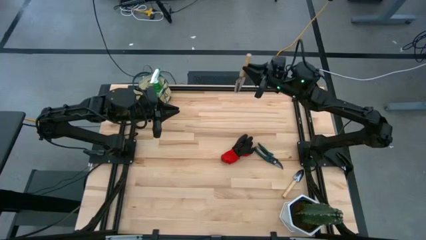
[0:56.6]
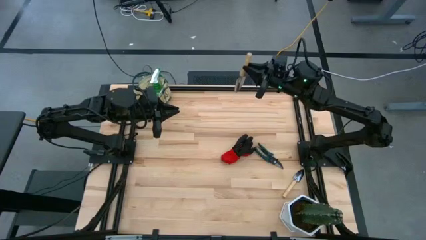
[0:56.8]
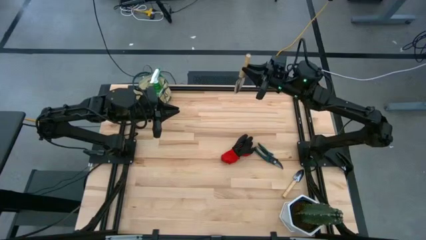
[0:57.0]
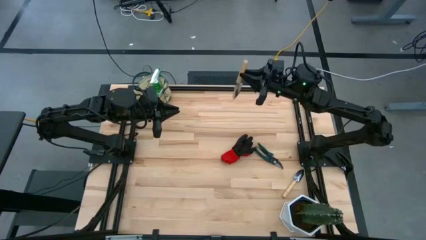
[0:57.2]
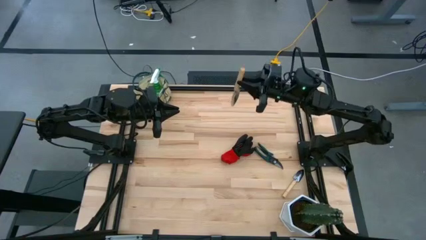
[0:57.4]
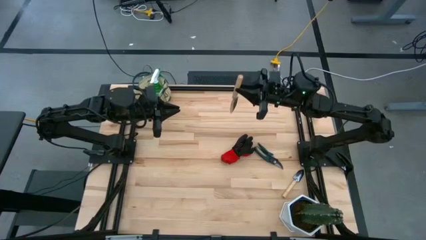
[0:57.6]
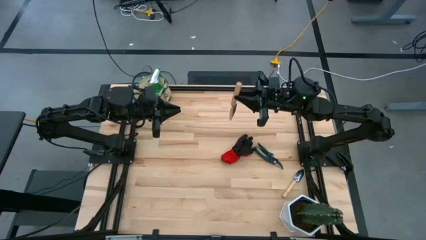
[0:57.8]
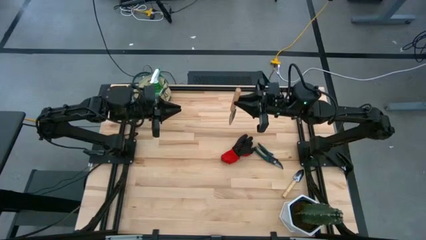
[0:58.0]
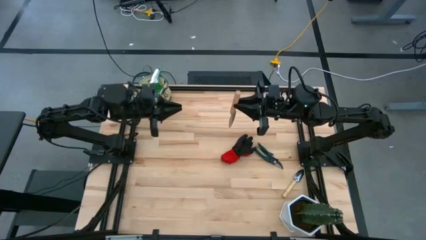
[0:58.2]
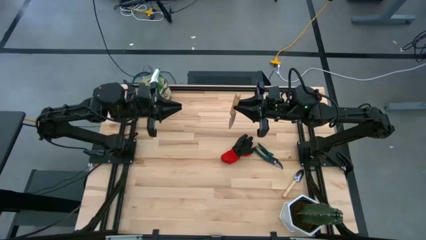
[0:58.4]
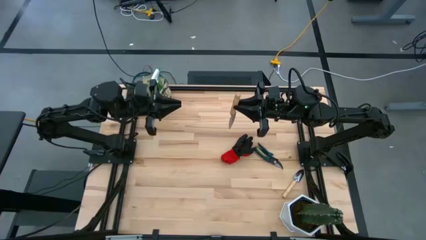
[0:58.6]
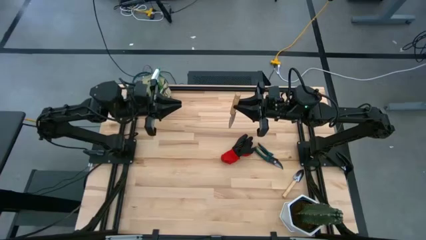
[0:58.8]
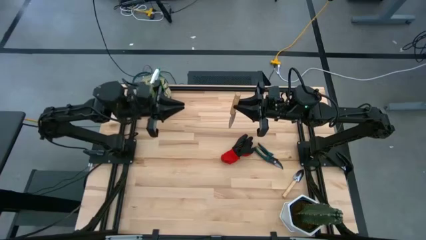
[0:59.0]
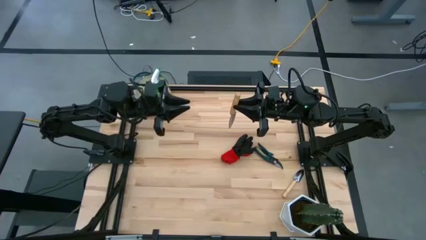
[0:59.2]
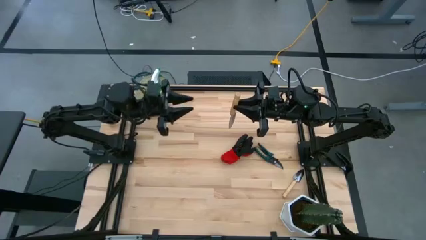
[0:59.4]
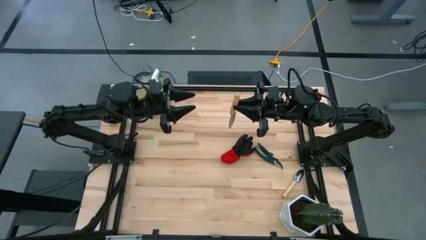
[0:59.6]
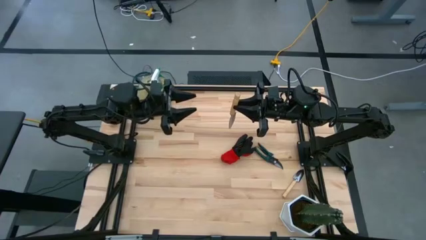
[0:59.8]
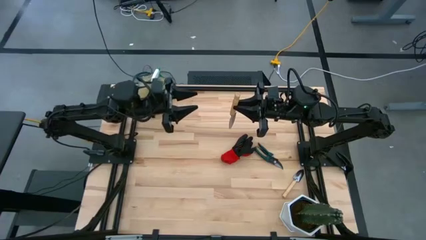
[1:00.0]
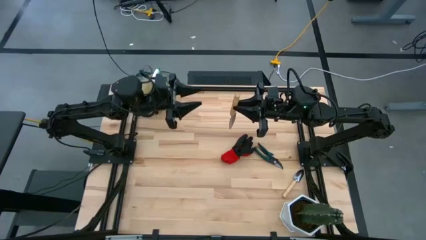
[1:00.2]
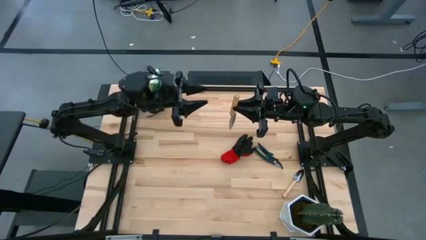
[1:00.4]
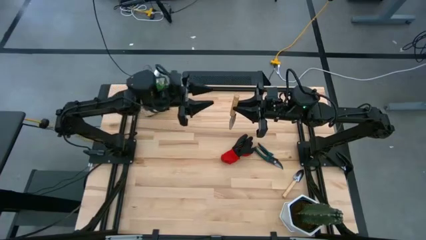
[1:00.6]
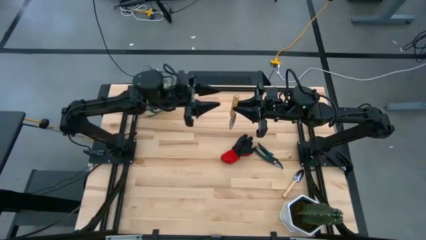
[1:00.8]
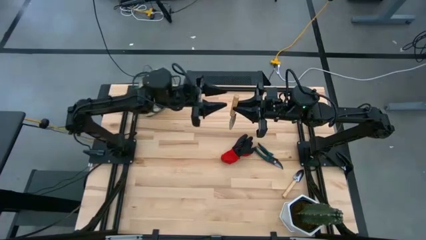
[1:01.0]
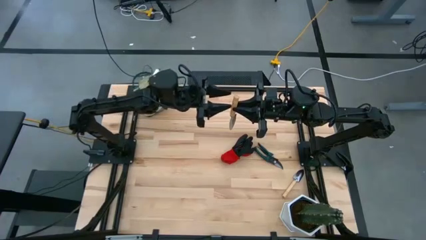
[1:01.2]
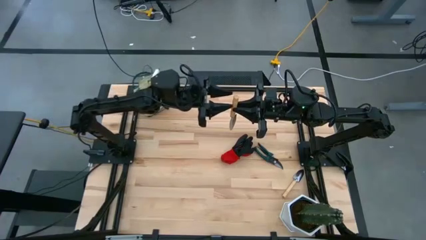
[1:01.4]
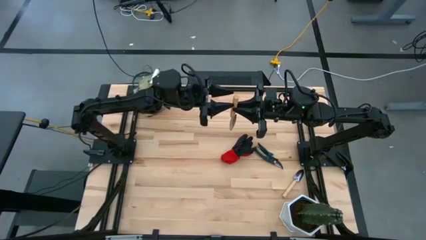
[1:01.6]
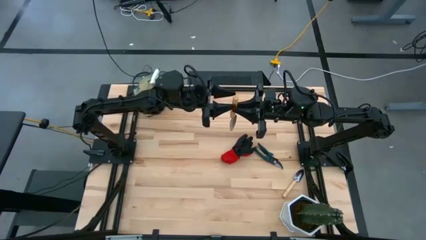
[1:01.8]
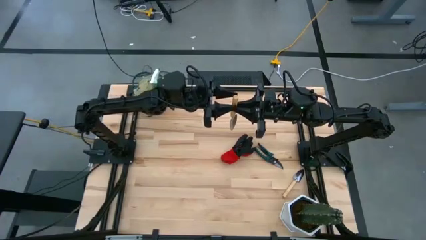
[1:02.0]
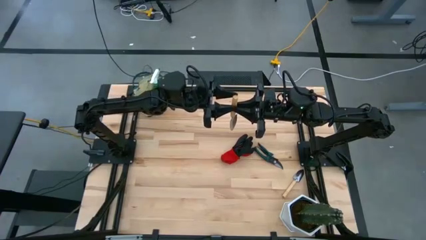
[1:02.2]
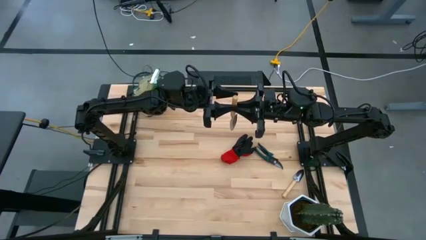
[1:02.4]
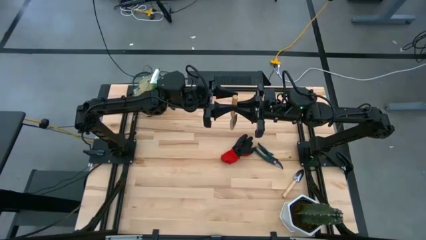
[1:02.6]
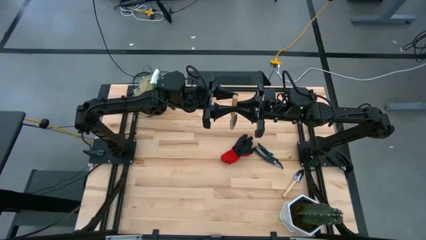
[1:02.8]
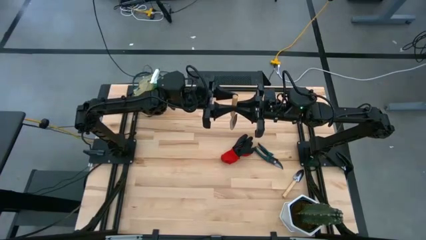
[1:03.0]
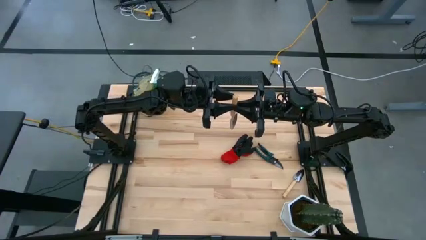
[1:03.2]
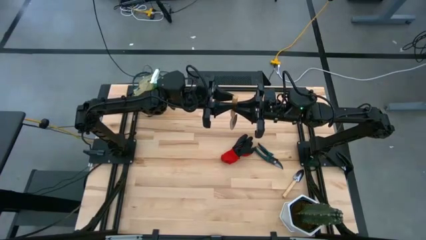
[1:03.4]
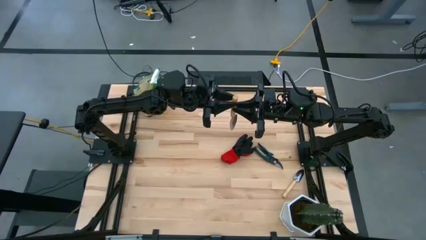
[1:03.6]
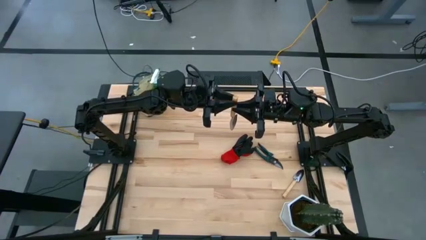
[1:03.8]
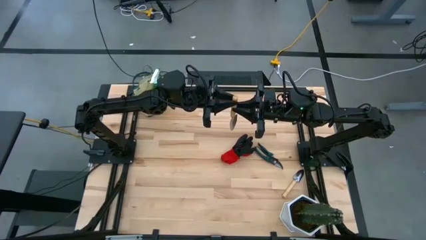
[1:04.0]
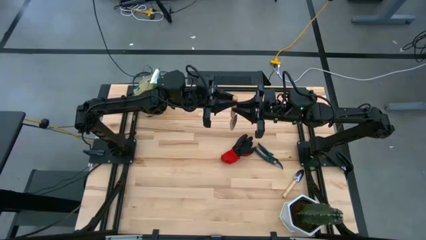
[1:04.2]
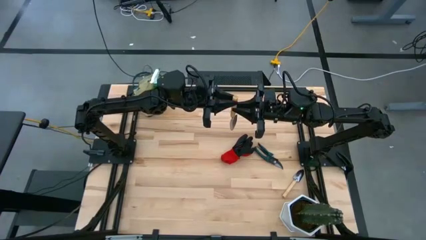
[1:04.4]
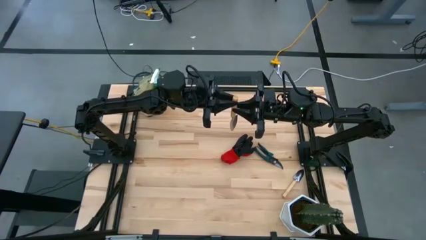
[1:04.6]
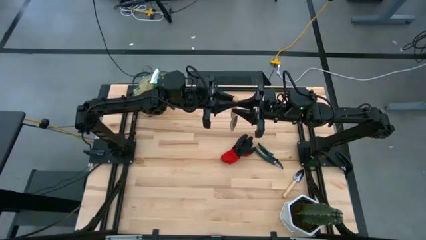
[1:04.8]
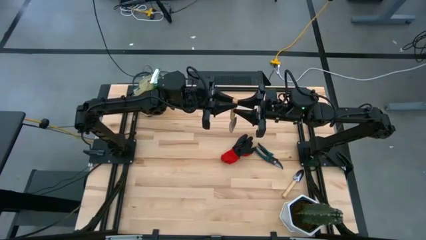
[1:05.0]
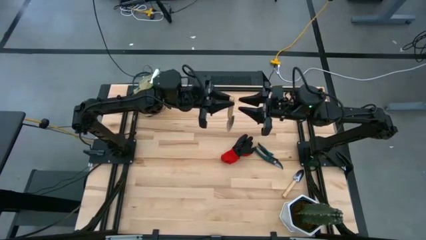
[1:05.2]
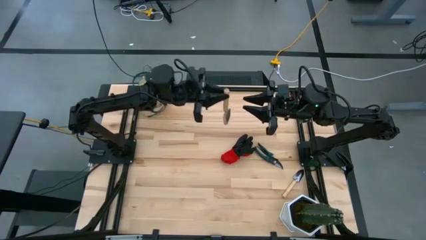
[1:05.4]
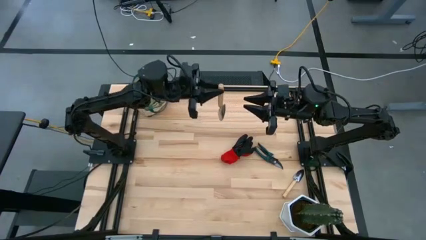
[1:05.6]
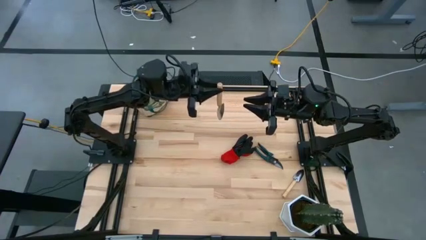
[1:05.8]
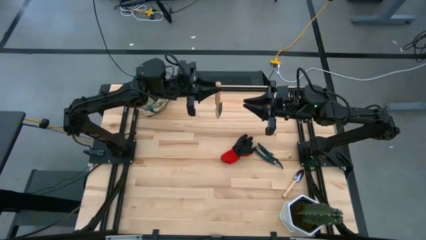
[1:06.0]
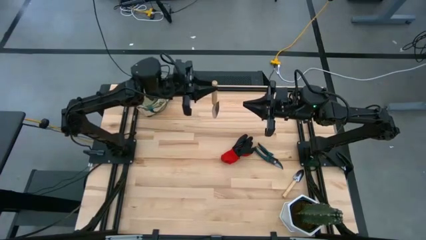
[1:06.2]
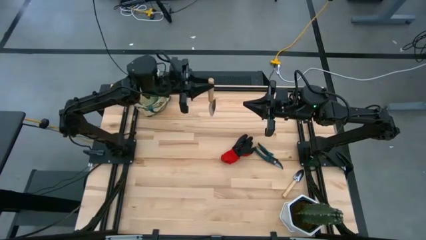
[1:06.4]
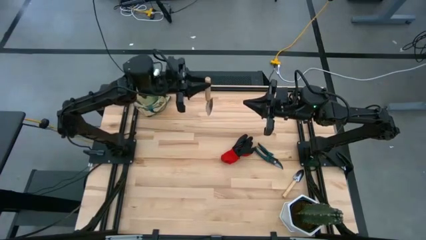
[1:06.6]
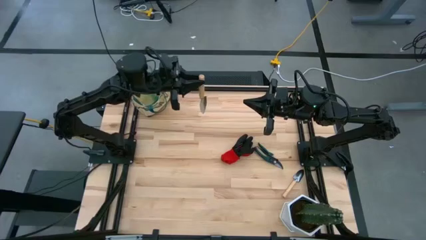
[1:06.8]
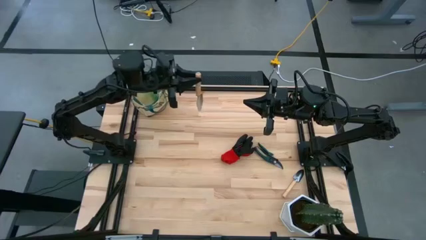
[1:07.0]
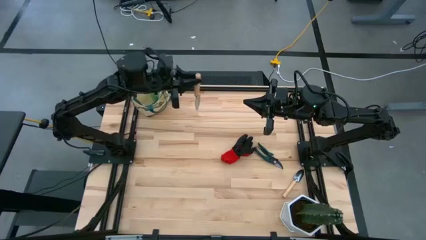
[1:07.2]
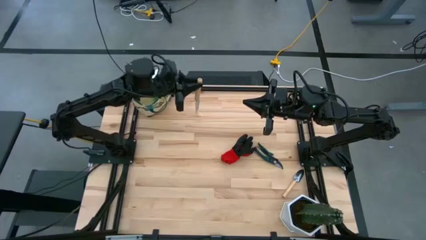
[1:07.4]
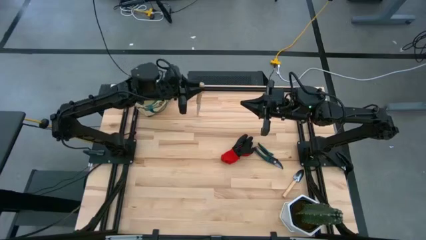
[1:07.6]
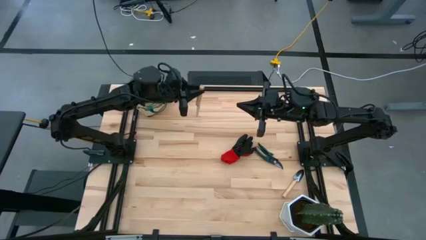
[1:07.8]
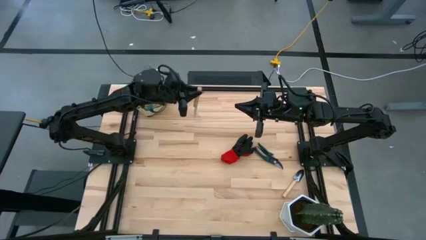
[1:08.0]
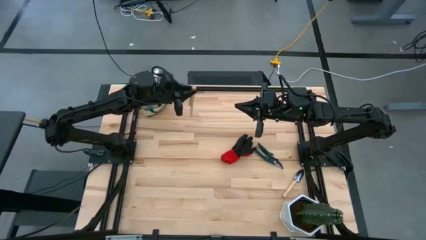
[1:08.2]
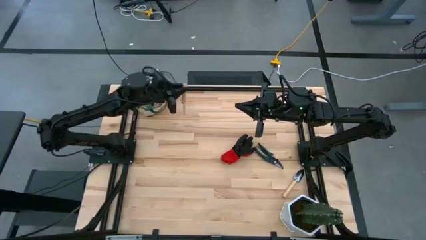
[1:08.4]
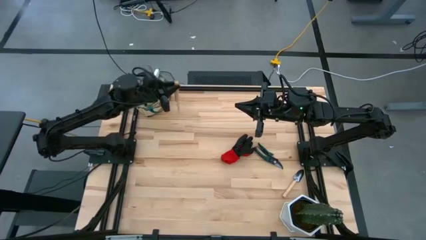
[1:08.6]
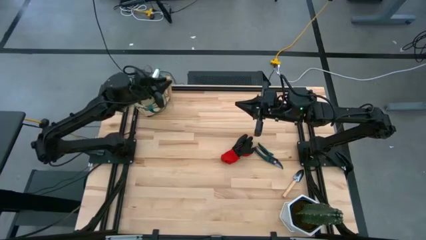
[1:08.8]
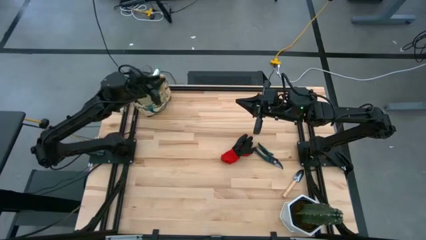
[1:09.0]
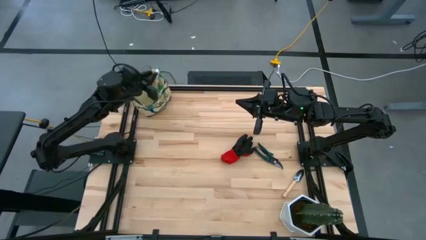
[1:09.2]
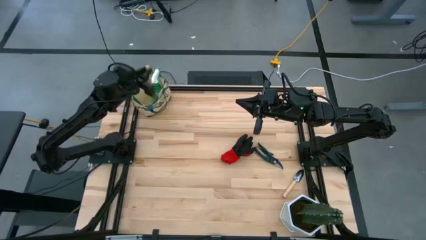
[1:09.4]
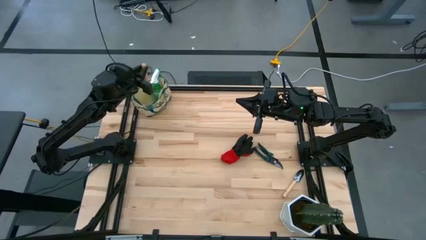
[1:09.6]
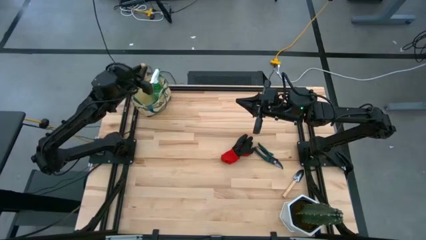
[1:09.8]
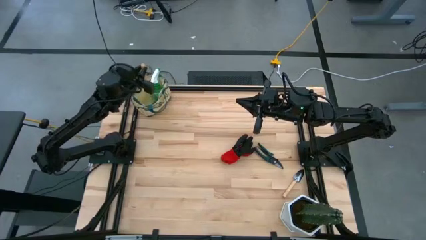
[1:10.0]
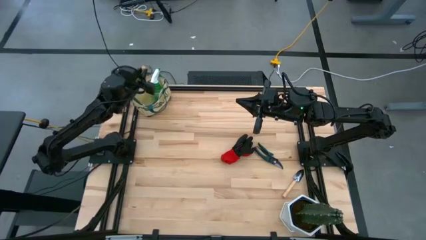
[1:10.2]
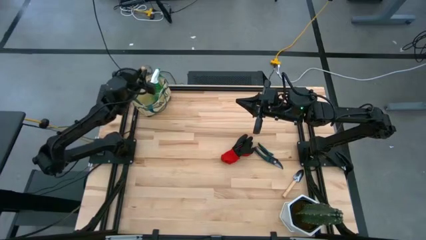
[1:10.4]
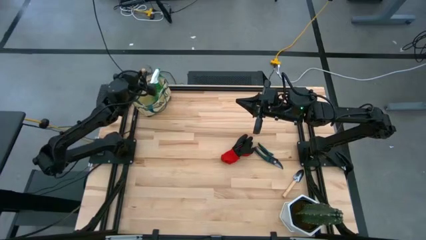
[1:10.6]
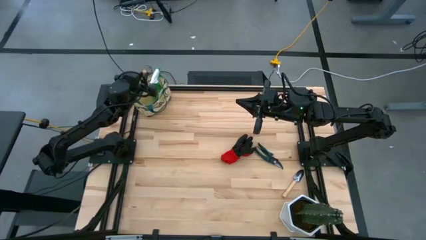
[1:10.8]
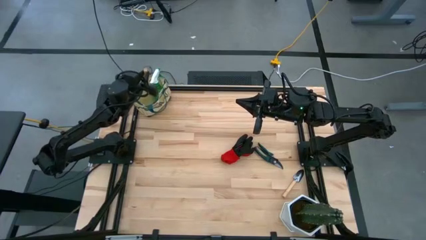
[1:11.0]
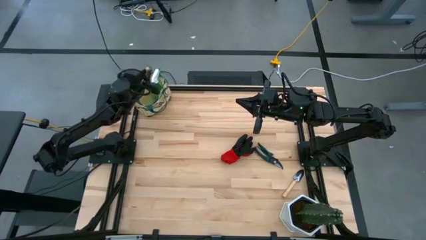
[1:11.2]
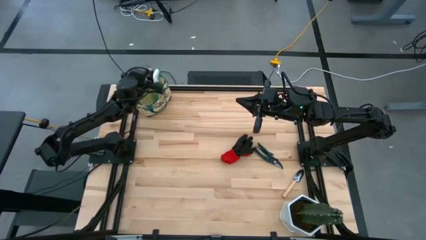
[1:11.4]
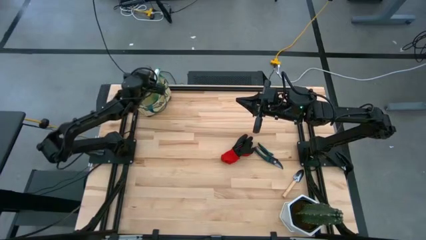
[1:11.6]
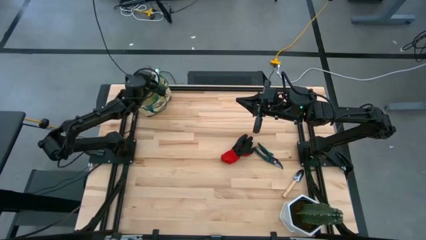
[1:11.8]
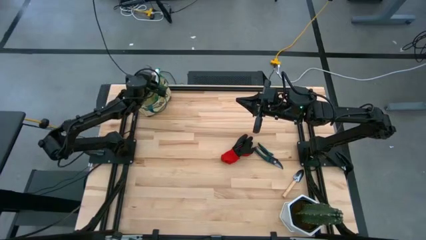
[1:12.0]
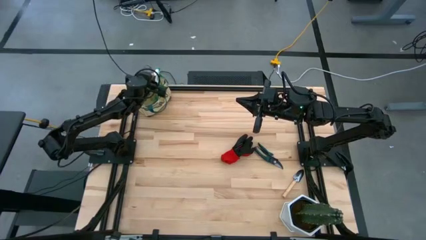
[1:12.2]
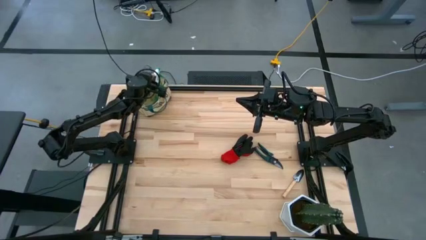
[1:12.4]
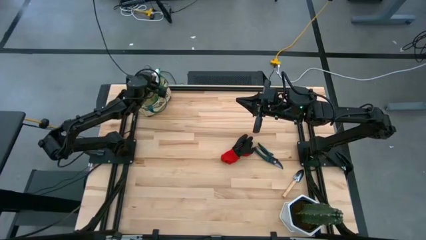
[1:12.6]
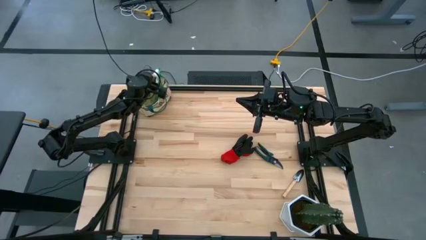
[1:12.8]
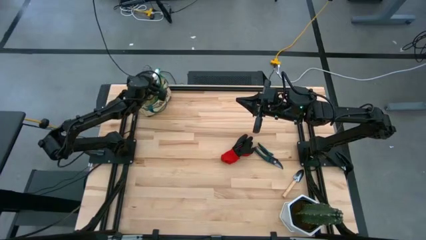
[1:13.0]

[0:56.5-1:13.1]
Task: Pick & Place Garden tools in Gardening bag
Put the top trowel into the gardening bag
